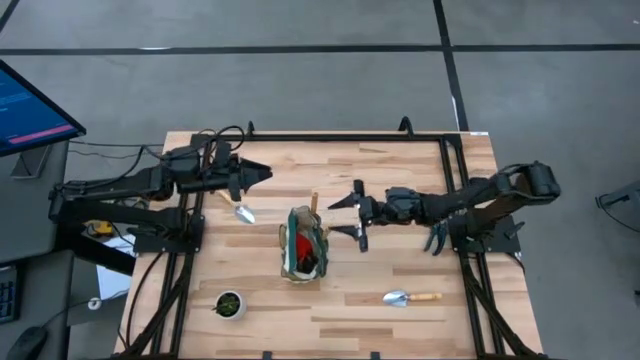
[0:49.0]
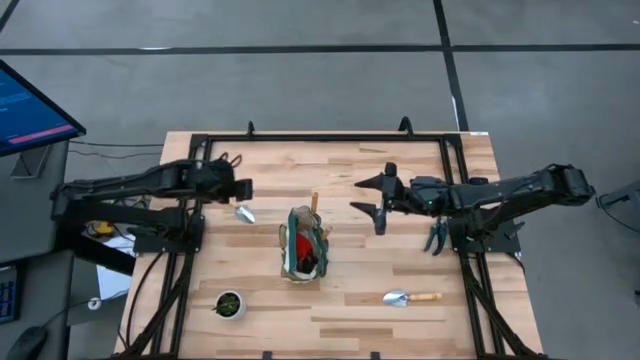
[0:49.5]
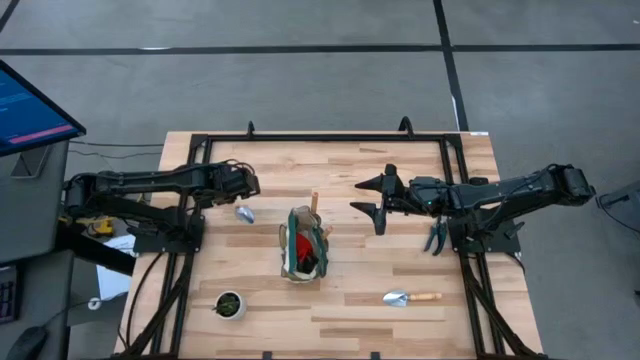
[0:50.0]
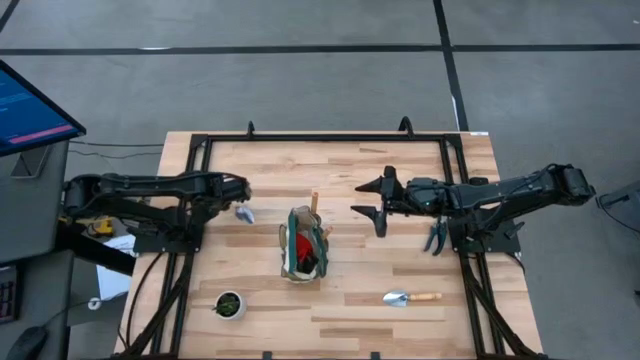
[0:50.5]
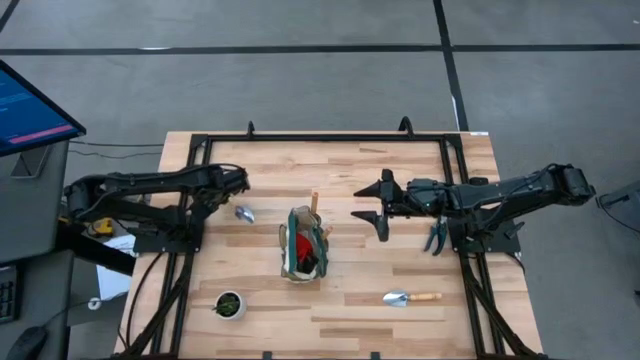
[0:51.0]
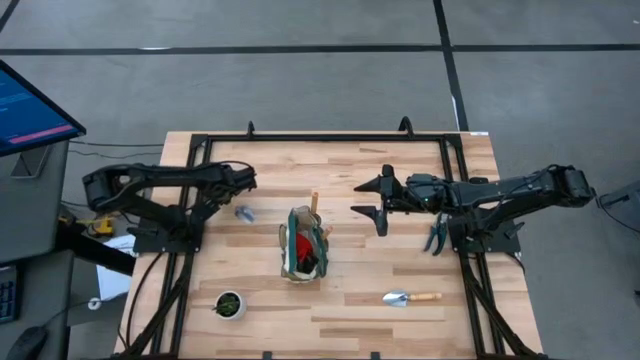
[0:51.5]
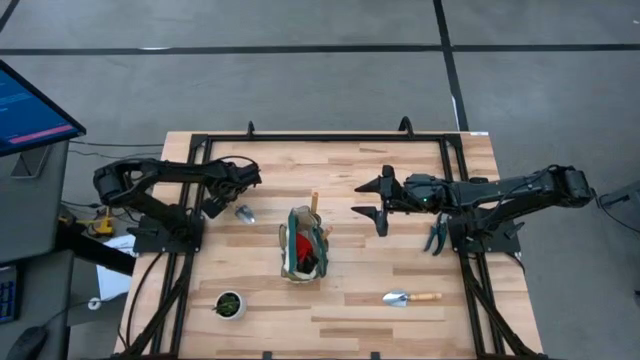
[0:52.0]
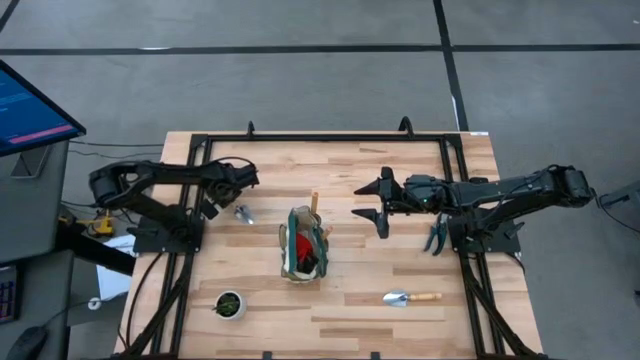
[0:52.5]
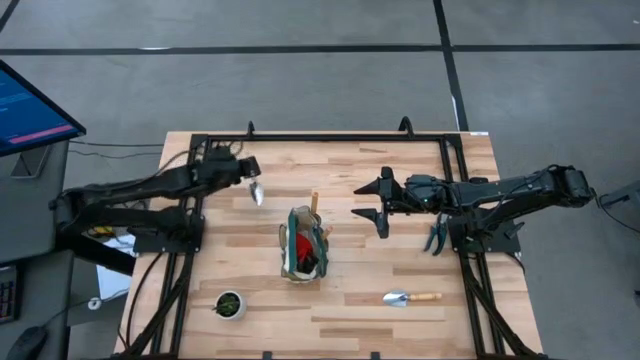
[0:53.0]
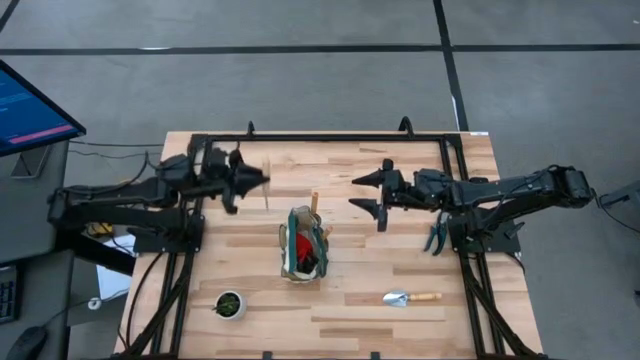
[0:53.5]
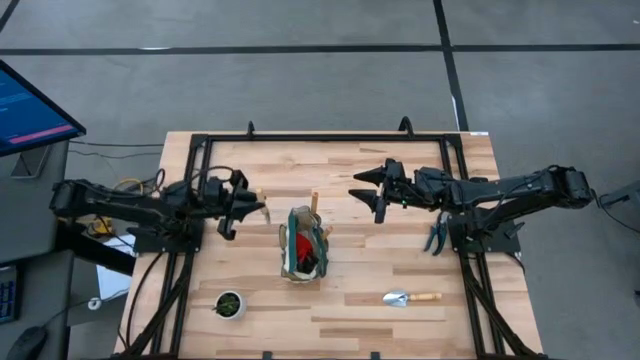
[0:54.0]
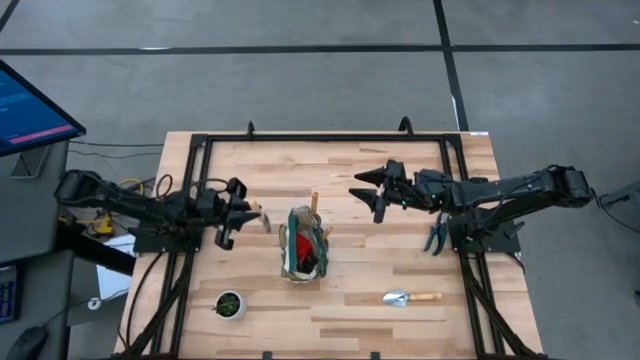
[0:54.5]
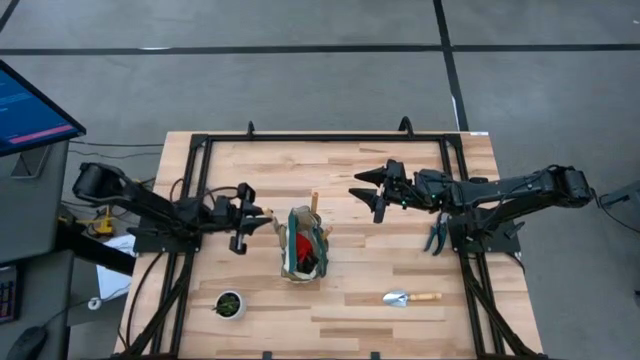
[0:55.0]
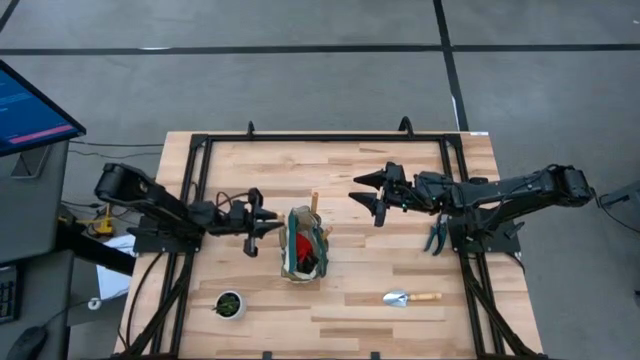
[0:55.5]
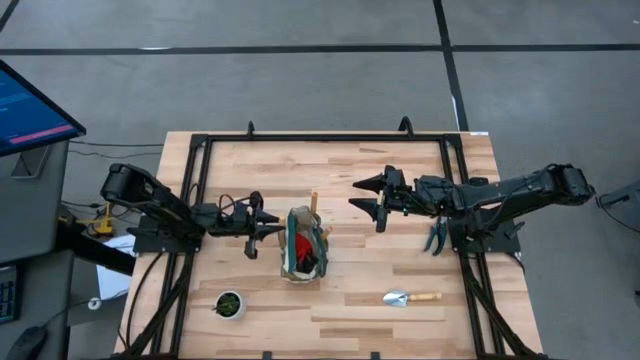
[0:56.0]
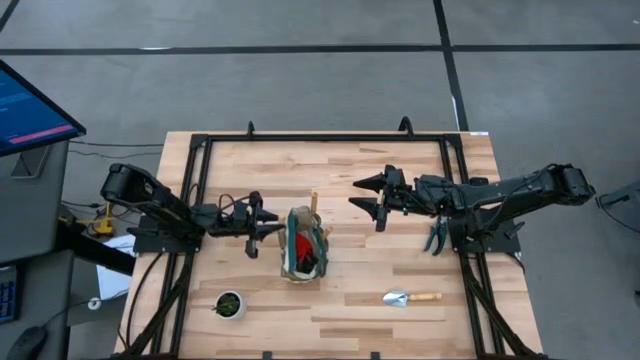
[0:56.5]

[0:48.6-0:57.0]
Task: Pick & Place Garden tools in Gardening bag
Put the brown trowel into the green gardening bag

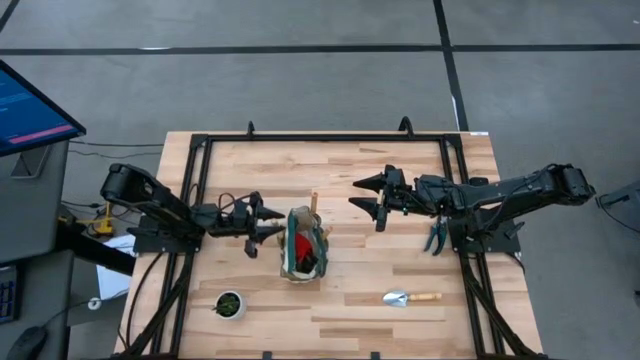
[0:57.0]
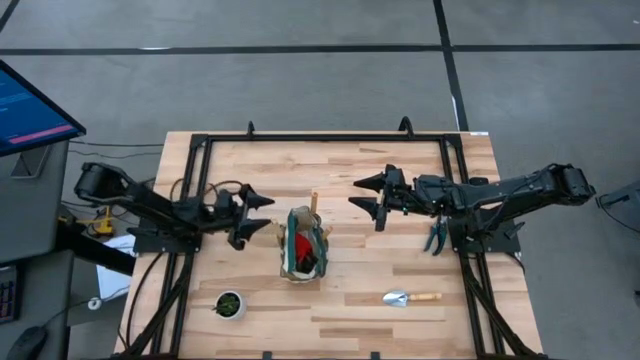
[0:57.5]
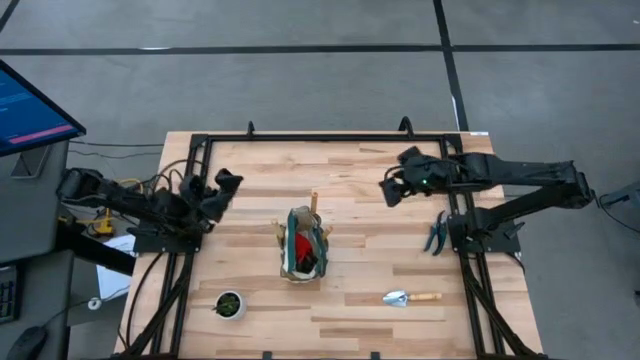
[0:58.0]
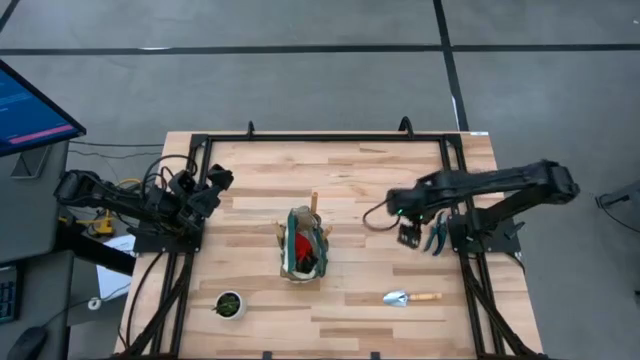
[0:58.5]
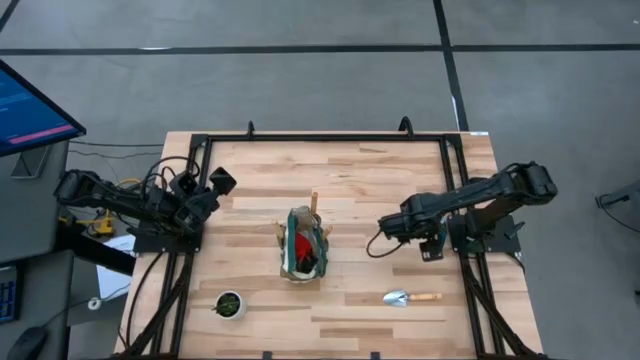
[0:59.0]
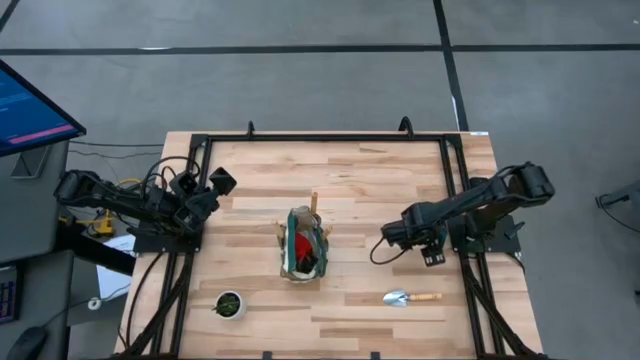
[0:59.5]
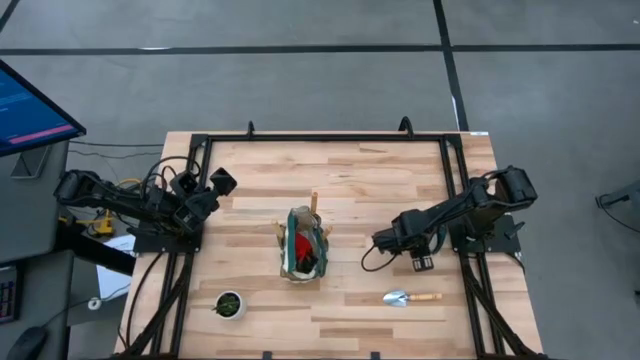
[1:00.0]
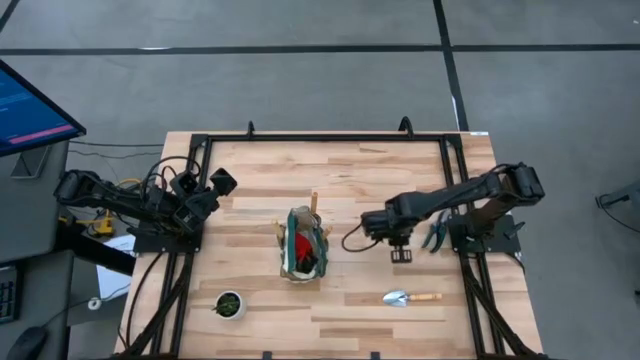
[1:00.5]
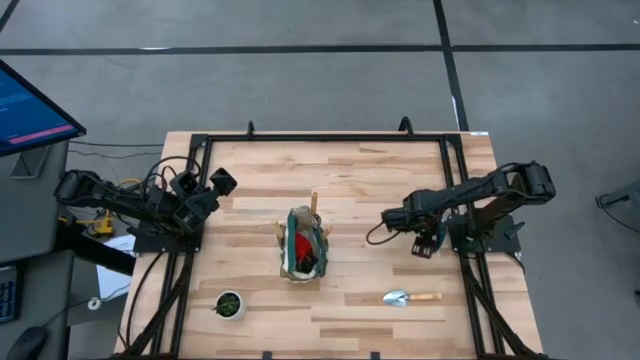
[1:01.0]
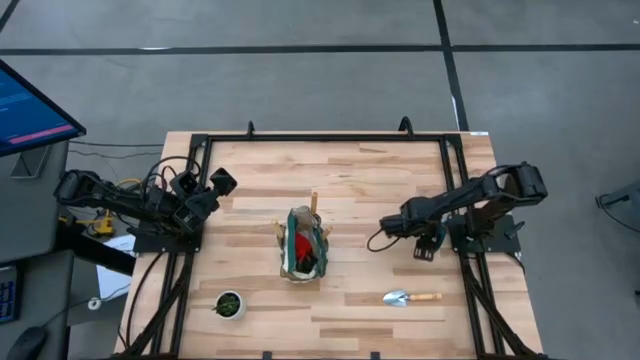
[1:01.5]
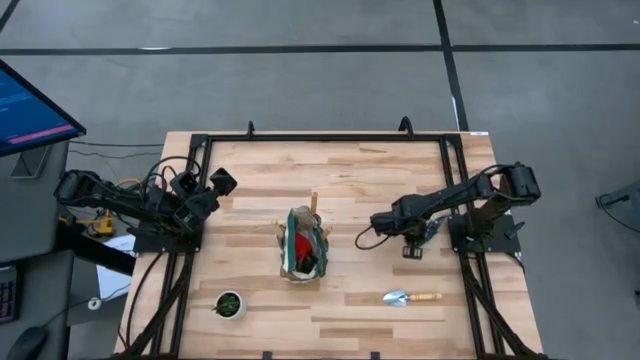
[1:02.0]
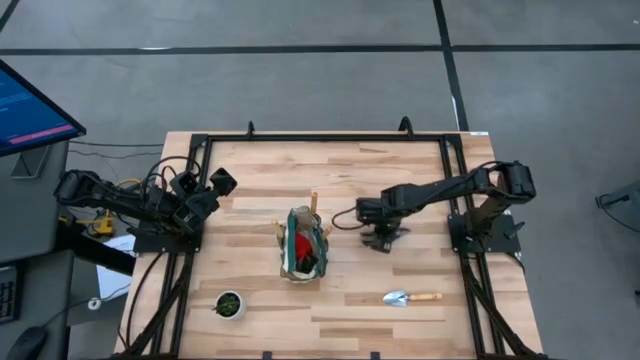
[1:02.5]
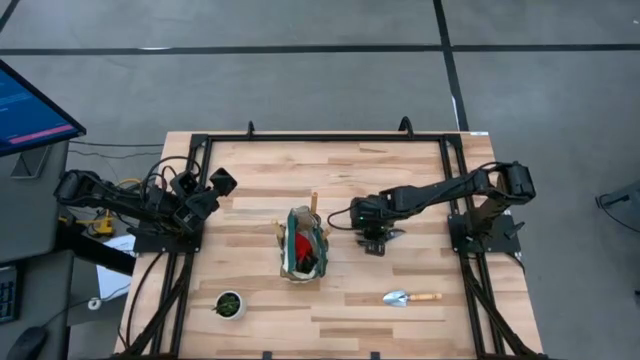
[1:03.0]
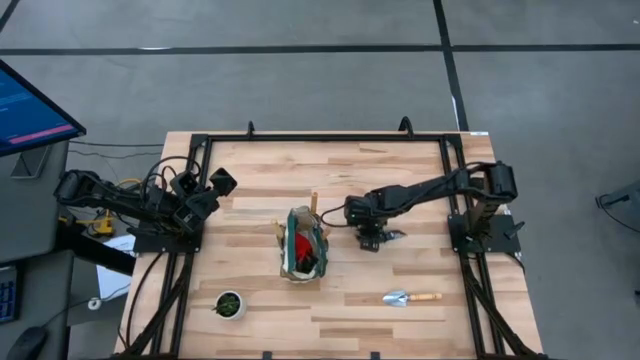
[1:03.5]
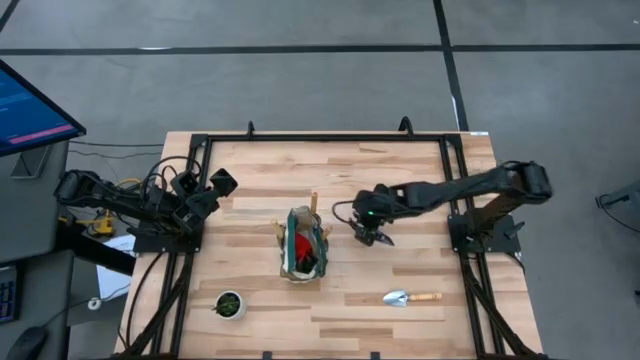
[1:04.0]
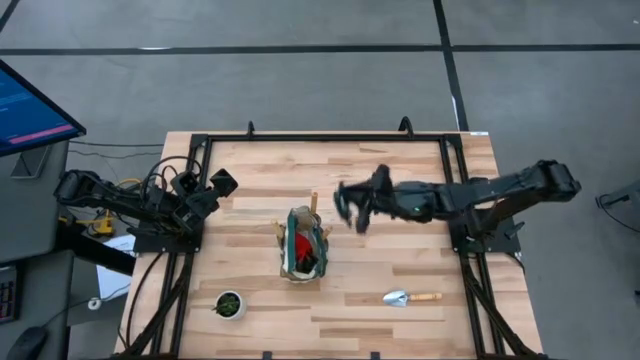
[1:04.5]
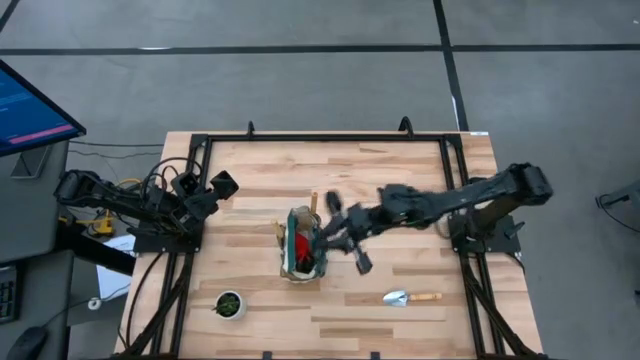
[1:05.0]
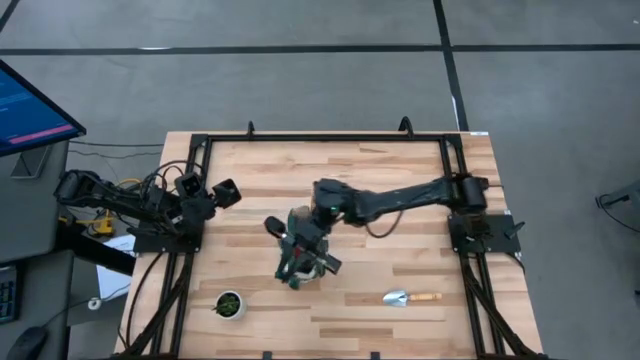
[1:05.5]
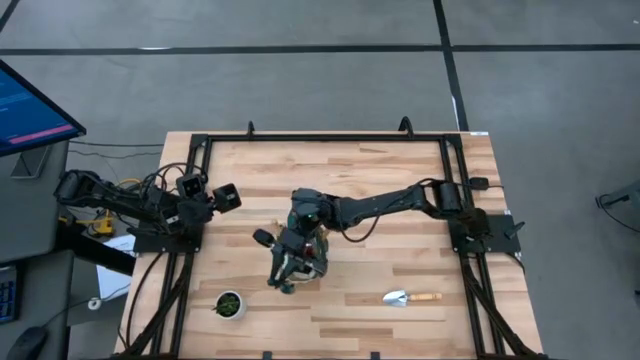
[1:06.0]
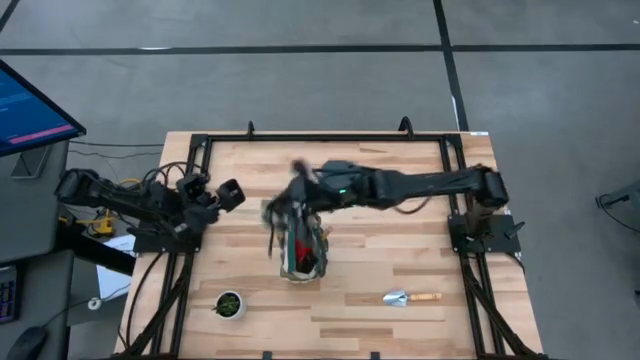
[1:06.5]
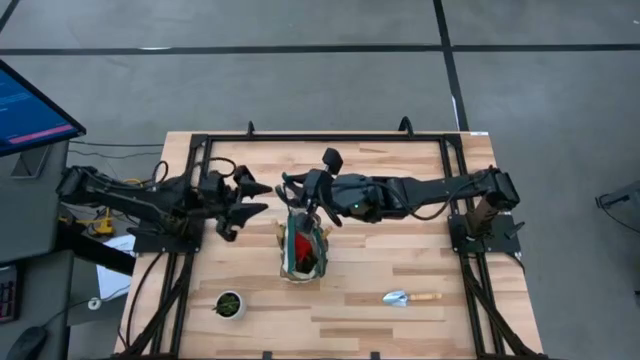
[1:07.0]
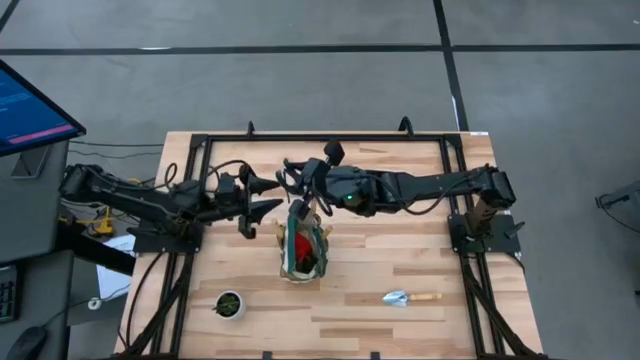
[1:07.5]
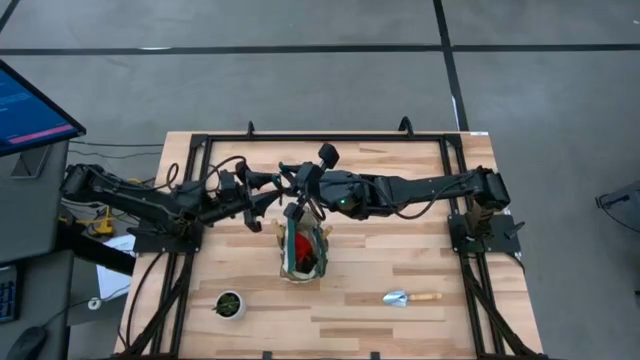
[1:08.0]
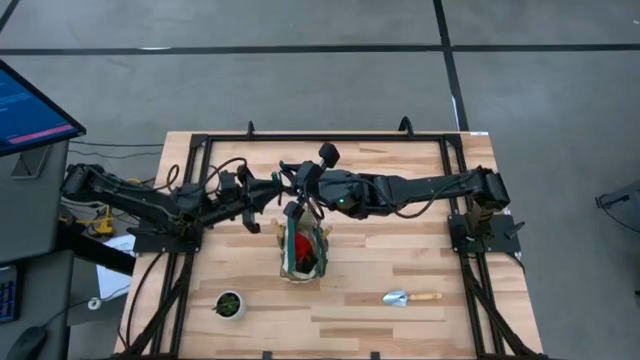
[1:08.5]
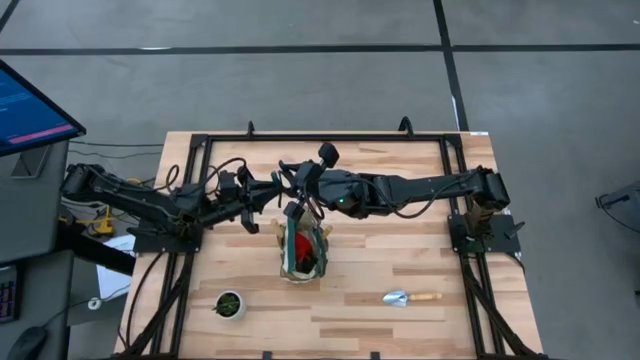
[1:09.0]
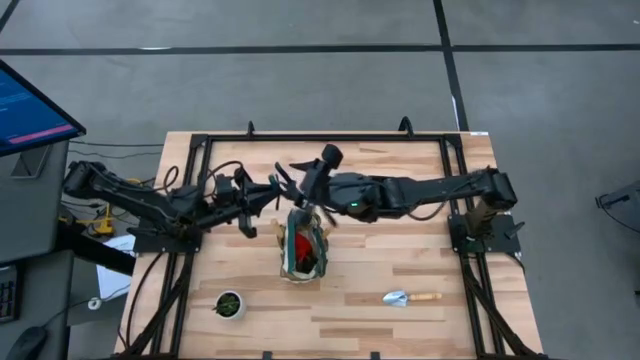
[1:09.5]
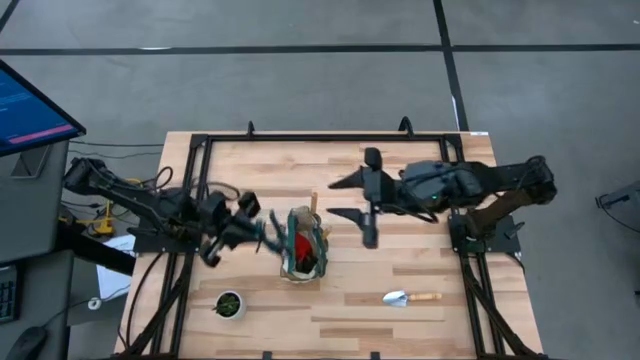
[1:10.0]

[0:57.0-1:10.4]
Put the green shear scissors into the green gardening bag
